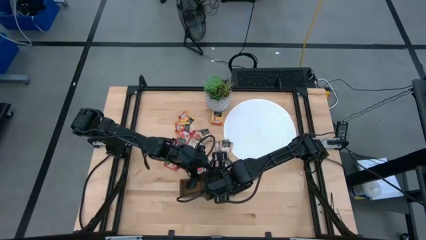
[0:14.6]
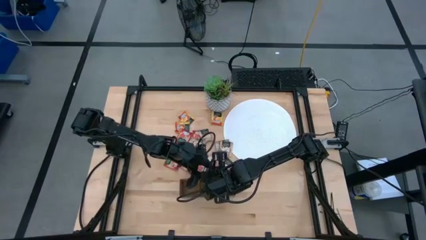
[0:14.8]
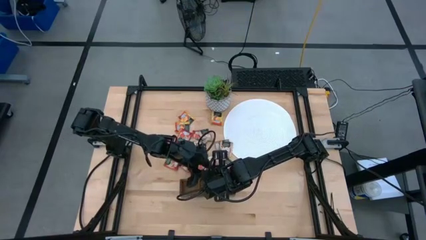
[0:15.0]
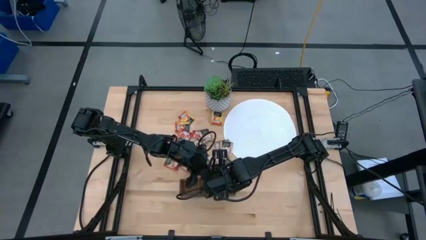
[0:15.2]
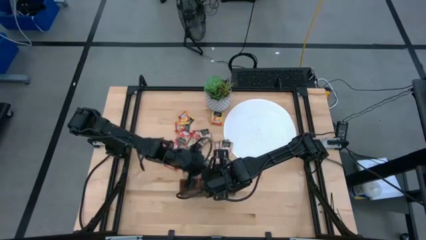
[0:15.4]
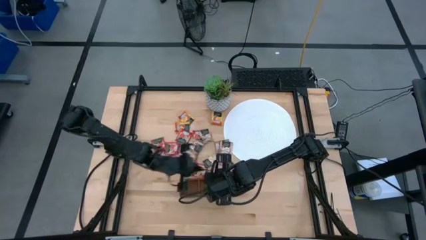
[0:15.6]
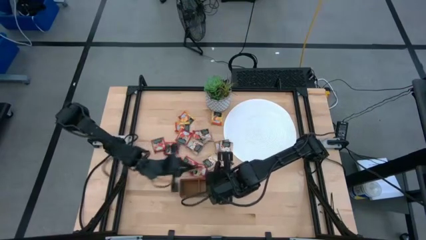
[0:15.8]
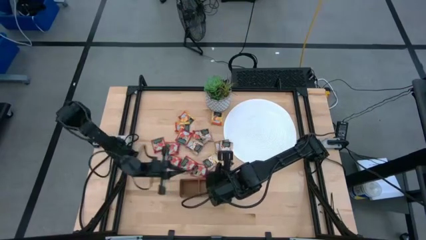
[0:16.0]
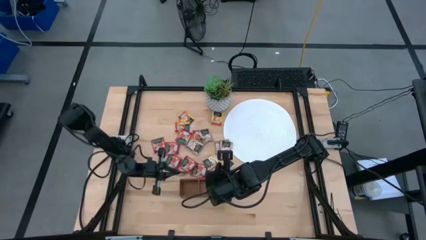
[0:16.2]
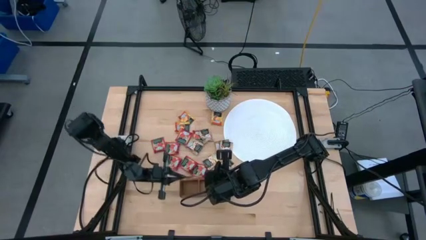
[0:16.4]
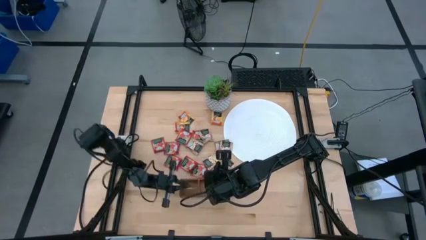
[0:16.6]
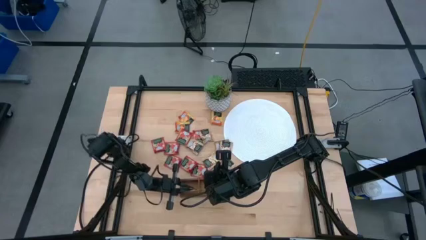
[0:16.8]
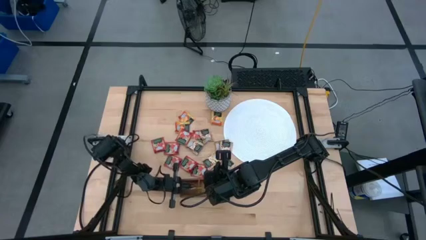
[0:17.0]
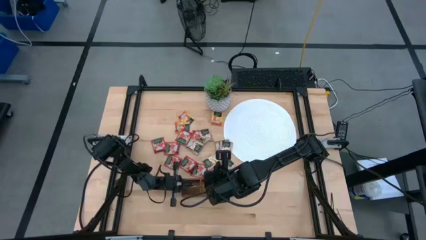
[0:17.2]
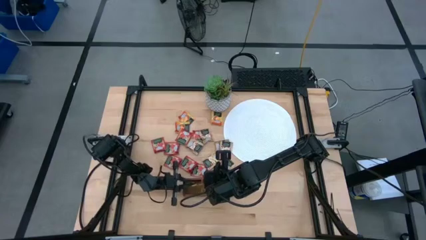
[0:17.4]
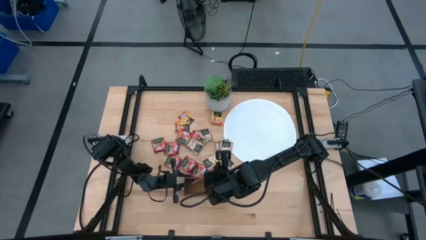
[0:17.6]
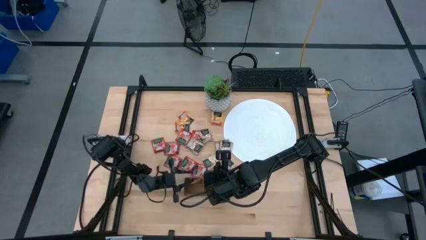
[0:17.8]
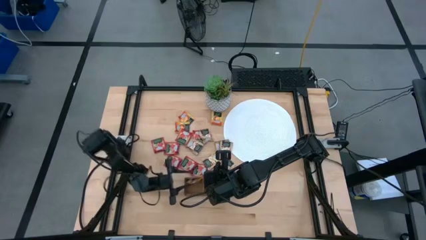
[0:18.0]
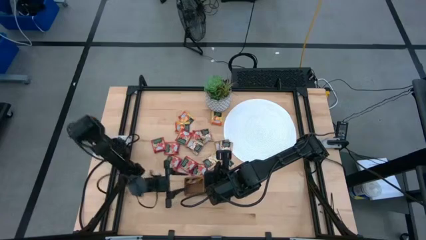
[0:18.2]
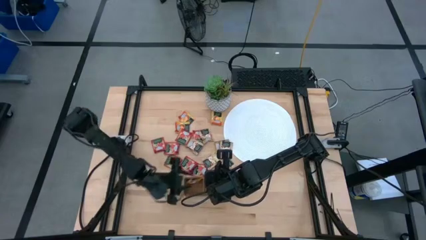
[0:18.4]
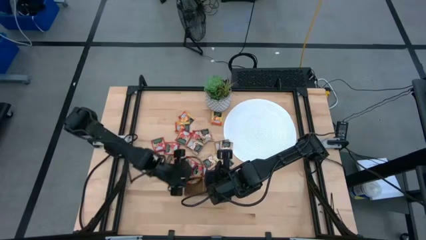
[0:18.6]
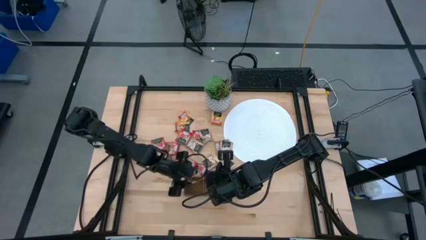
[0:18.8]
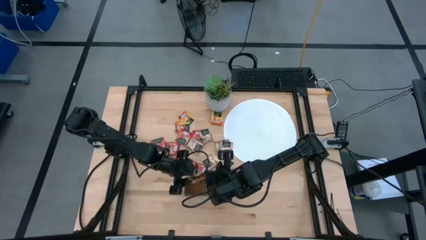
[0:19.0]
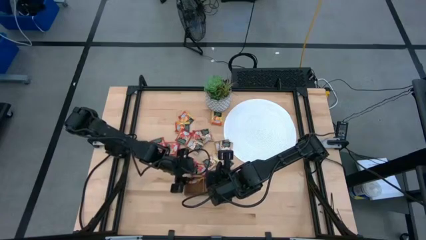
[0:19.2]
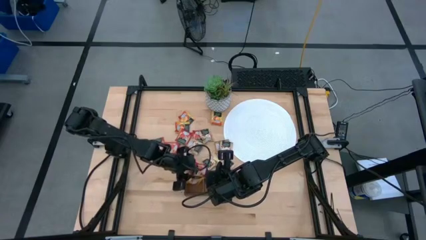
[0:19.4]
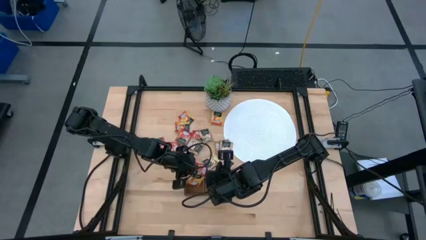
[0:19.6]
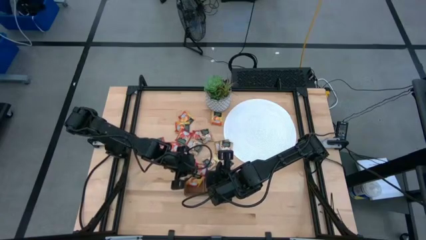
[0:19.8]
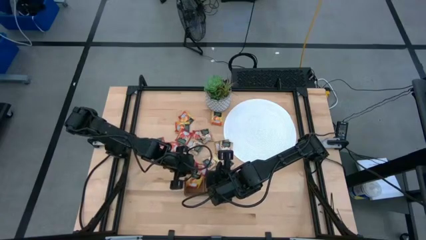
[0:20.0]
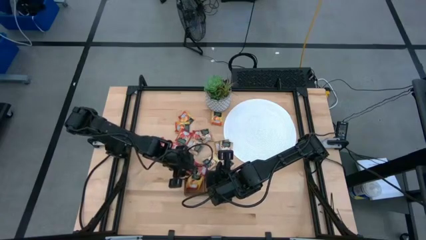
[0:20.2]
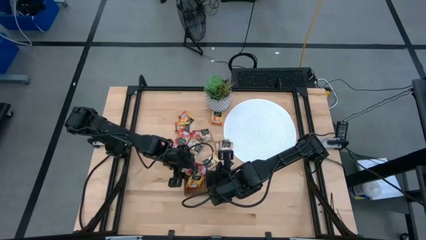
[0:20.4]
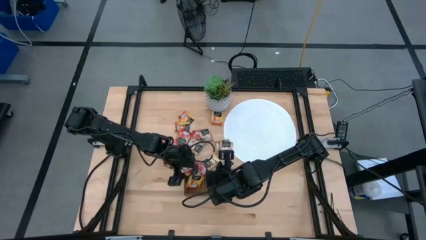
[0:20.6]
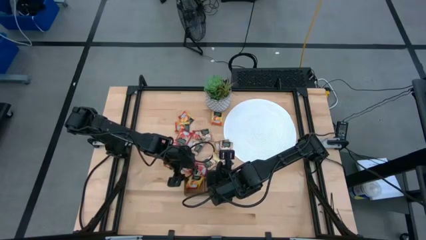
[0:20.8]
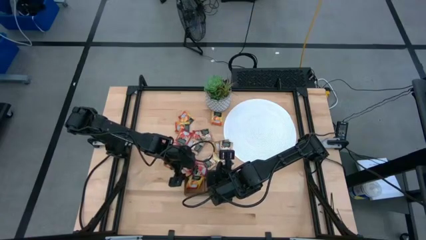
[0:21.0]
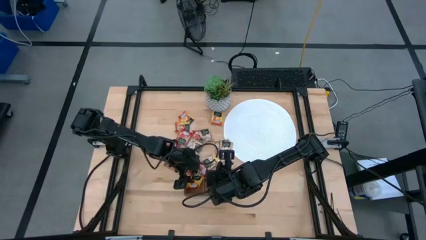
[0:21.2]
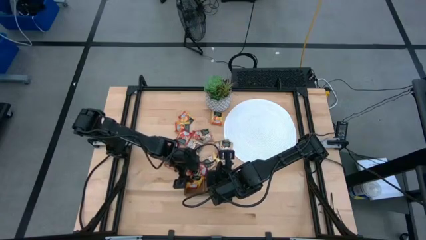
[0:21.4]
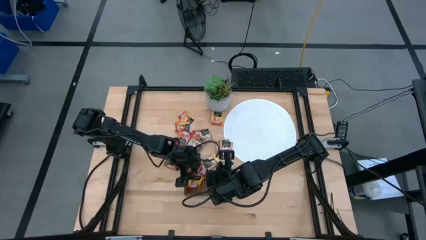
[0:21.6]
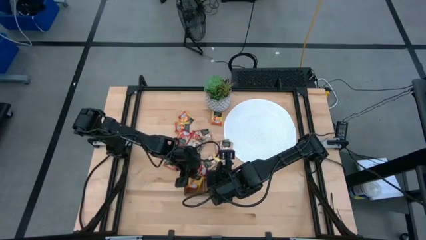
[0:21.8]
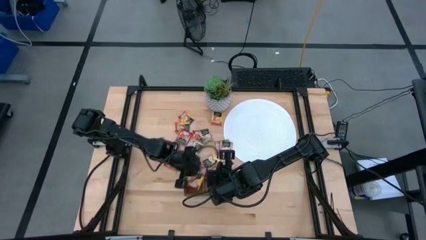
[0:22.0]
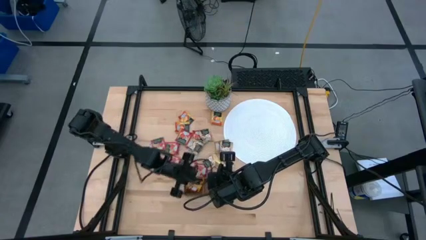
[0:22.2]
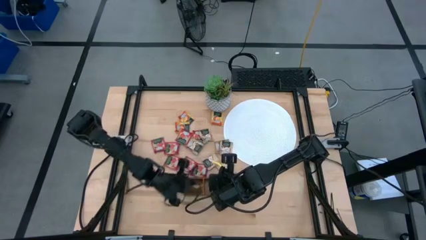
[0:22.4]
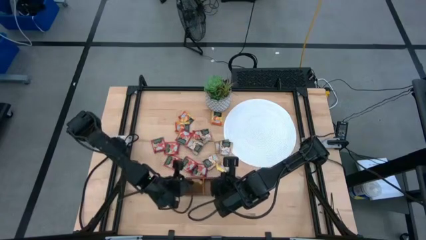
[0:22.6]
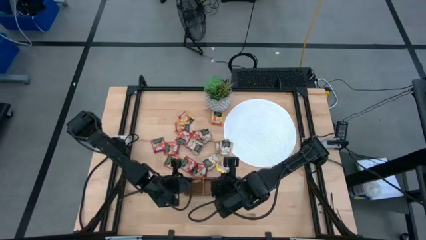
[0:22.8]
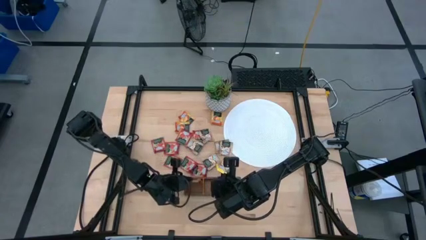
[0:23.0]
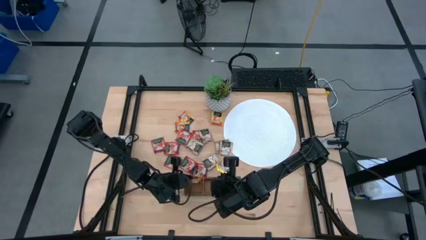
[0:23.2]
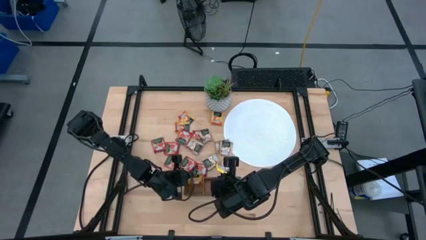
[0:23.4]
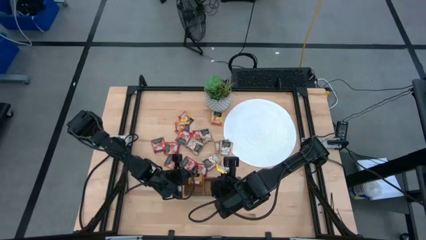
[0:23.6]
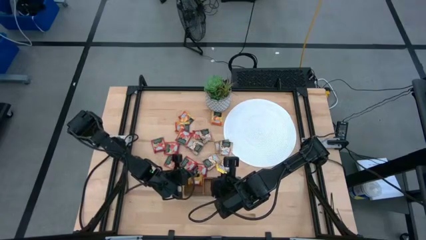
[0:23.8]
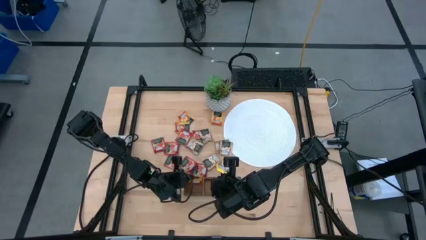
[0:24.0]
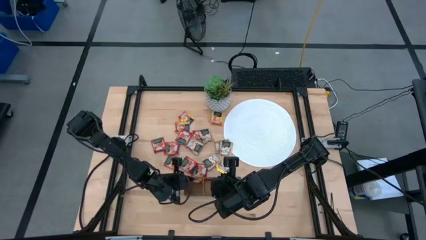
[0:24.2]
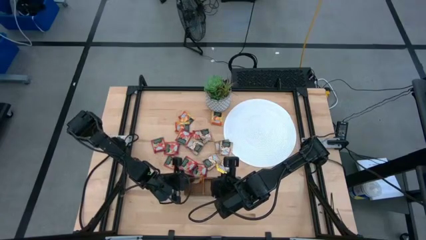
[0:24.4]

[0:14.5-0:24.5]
Task: Pick & Place Tea
Put the orange tea bag into the left section of the wooden organizer

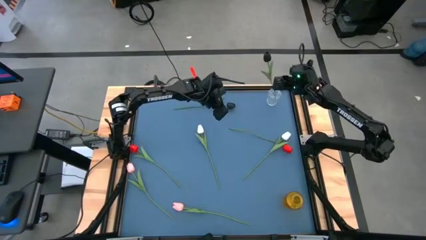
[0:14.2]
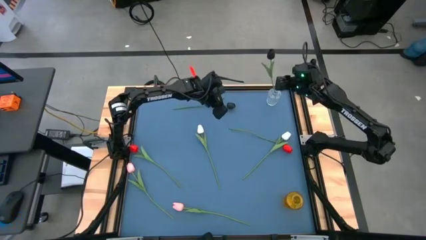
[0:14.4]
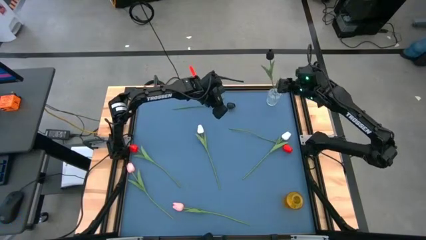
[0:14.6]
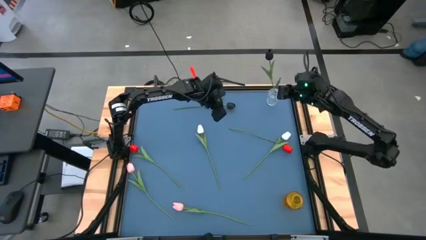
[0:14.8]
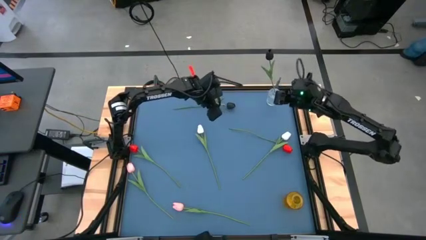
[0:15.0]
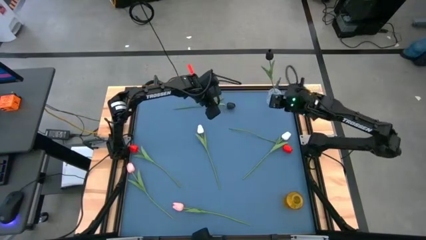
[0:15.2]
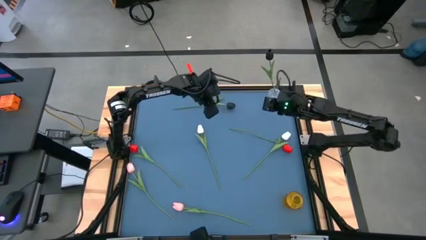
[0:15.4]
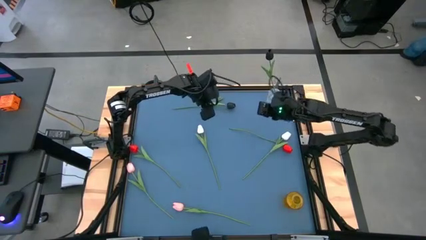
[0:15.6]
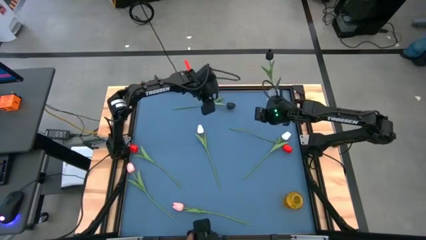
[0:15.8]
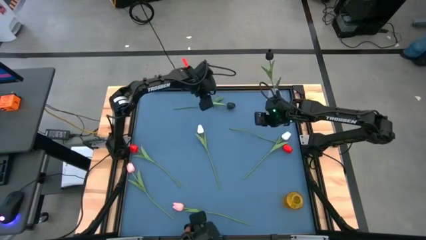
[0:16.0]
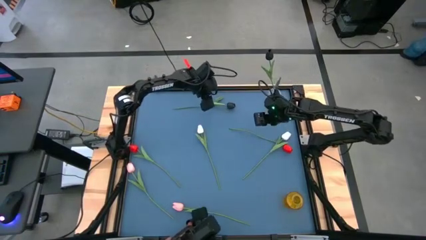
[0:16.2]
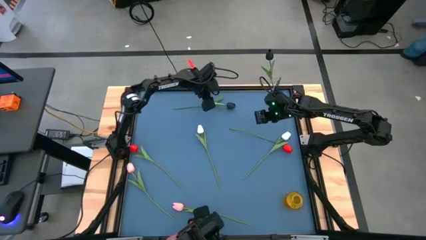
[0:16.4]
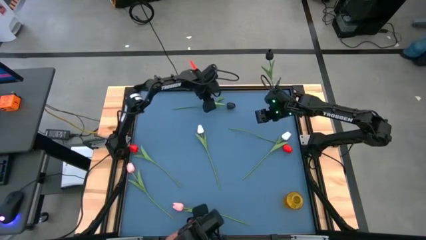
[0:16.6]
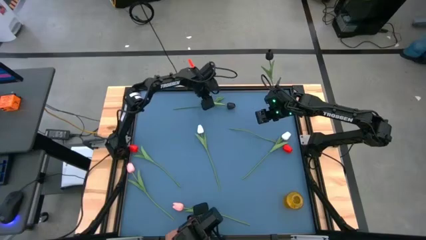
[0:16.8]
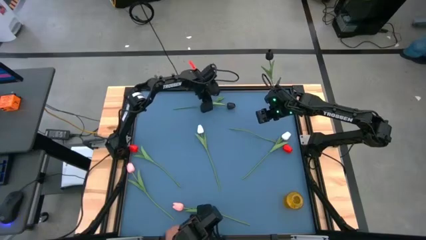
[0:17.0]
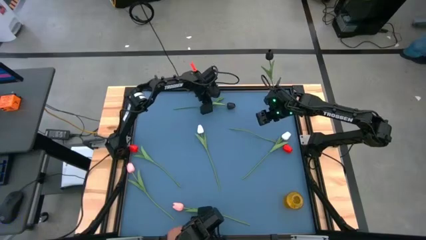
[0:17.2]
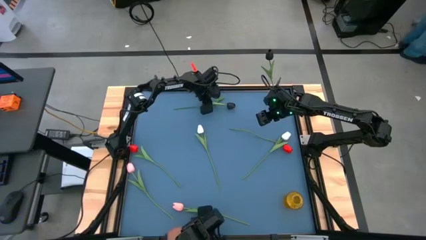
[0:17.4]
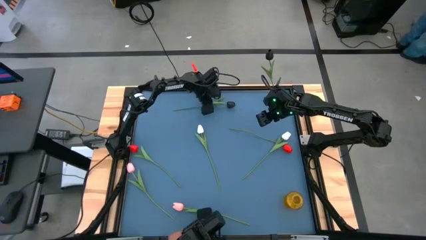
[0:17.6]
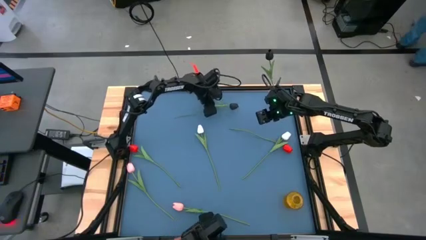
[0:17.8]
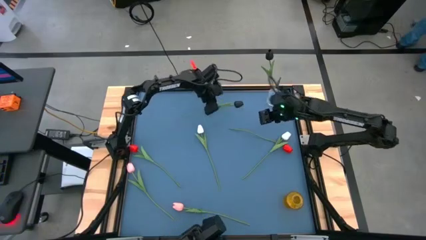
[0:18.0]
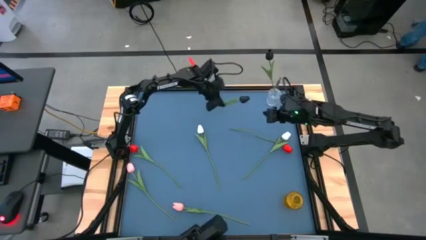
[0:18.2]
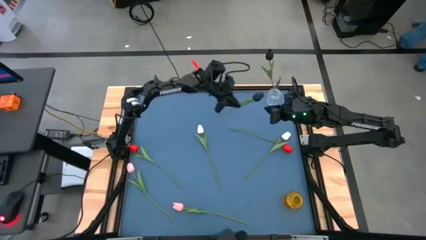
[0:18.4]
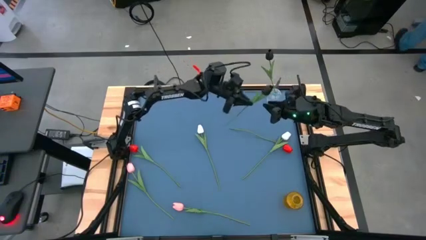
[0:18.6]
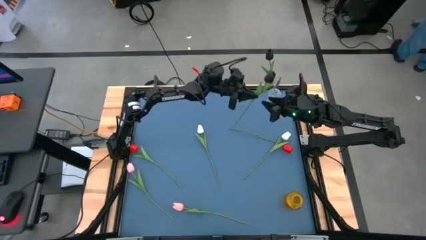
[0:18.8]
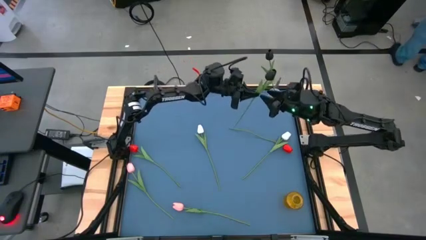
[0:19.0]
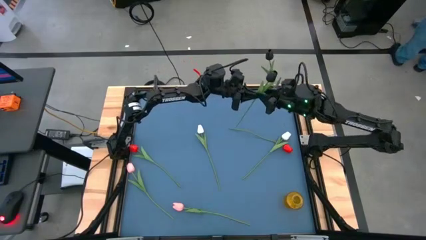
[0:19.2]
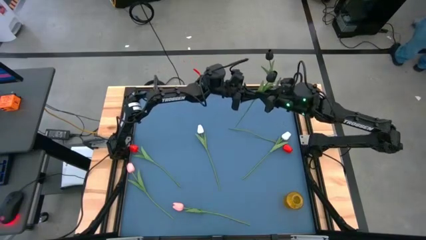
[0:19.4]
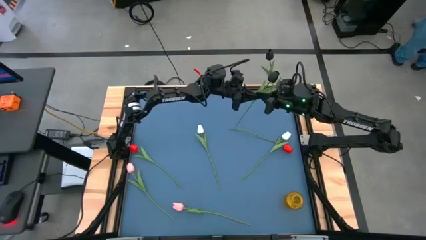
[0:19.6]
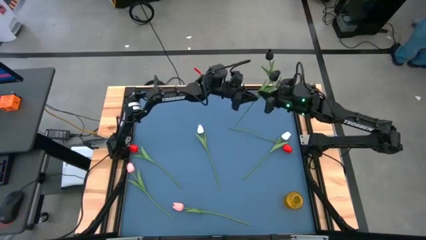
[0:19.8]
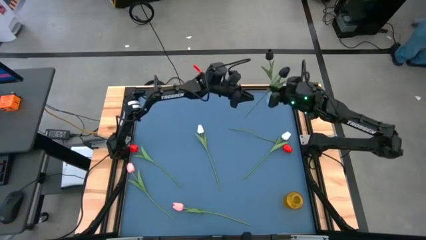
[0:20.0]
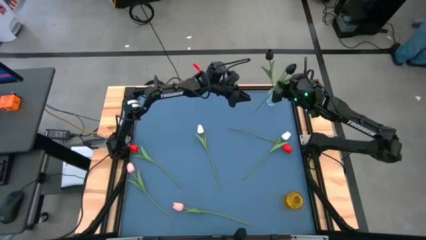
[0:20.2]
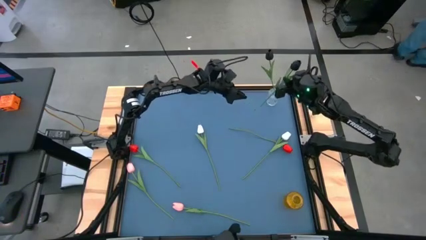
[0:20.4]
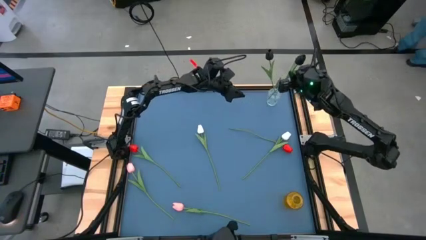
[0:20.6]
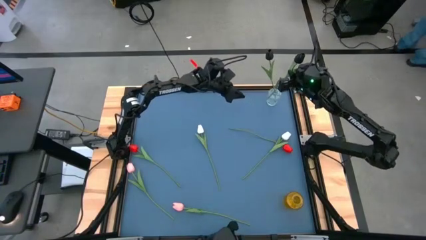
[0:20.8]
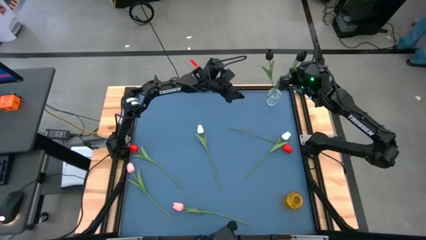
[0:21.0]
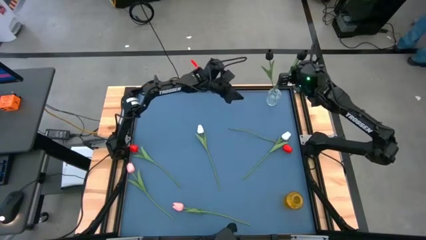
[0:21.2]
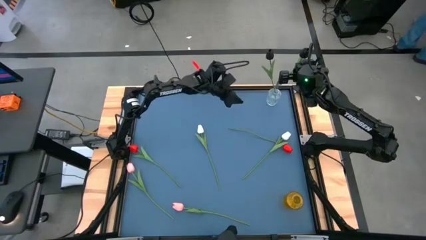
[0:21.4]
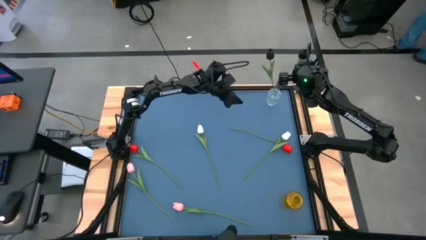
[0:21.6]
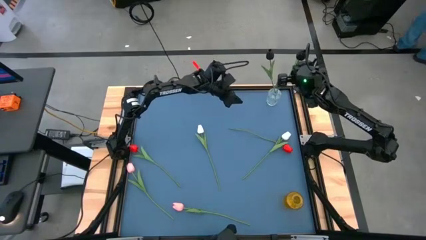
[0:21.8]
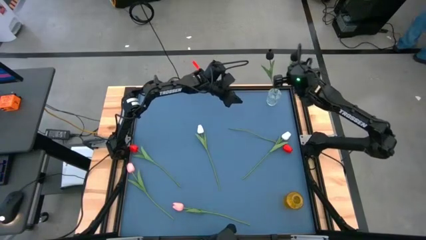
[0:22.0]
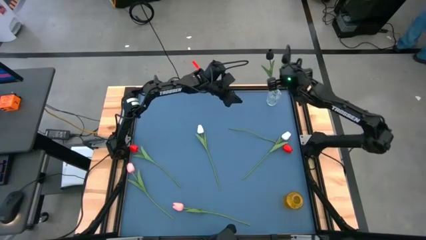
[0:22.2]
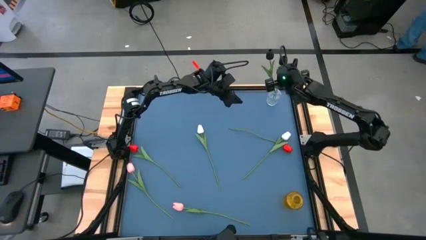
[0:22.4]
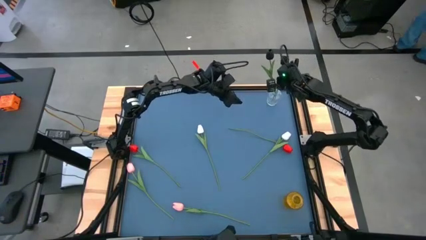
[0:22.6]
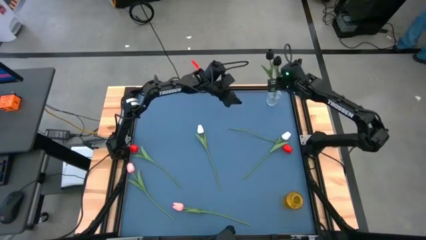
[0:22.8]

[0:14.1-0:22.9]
Task: Sort flowers into vase by color
Put the black tulip into the transparent vase
